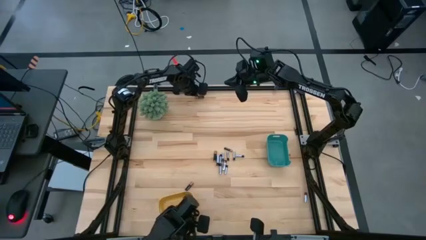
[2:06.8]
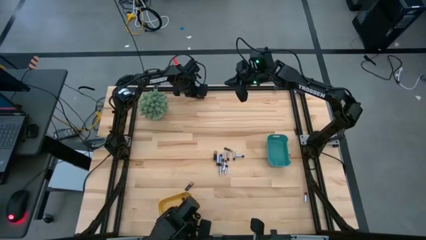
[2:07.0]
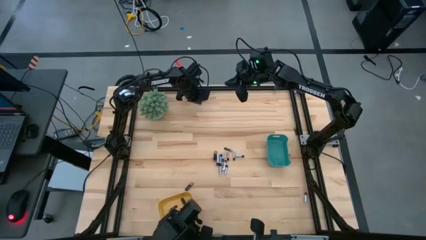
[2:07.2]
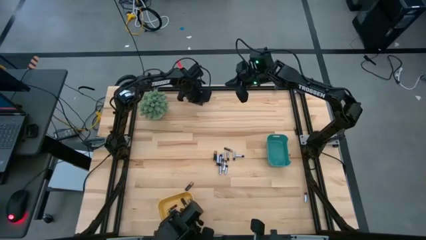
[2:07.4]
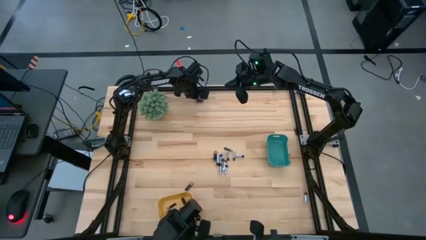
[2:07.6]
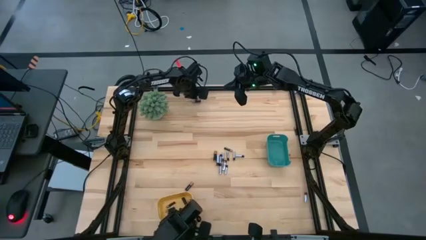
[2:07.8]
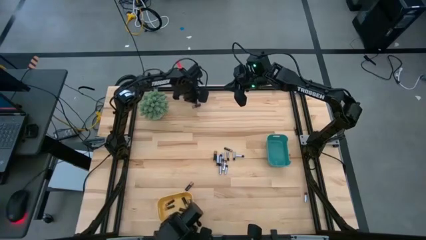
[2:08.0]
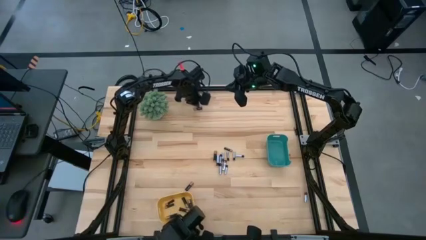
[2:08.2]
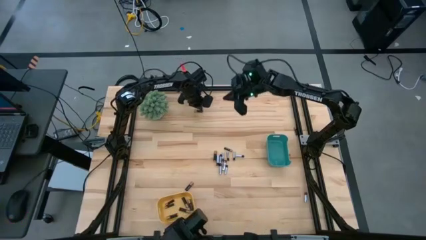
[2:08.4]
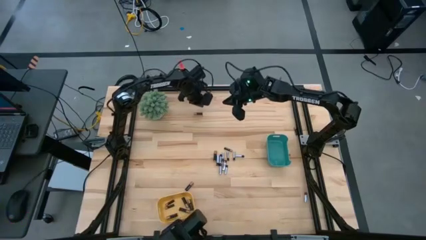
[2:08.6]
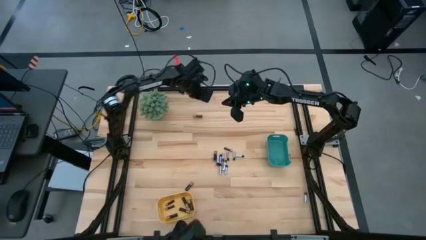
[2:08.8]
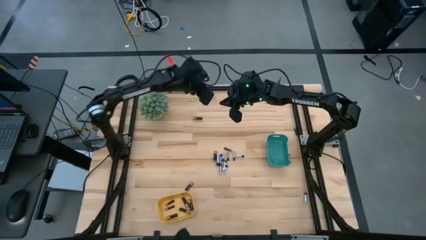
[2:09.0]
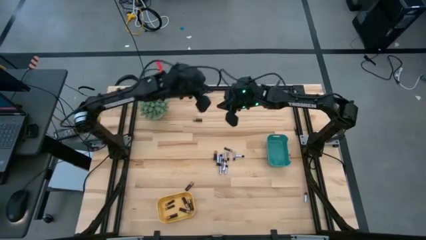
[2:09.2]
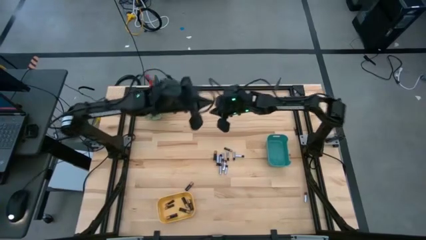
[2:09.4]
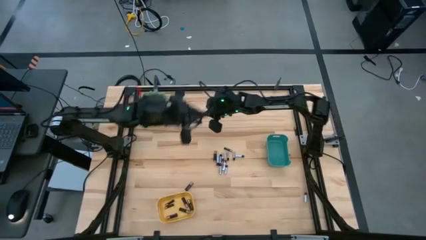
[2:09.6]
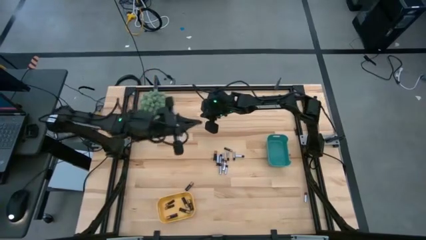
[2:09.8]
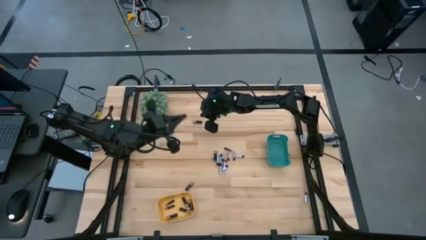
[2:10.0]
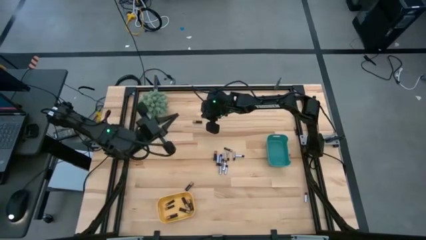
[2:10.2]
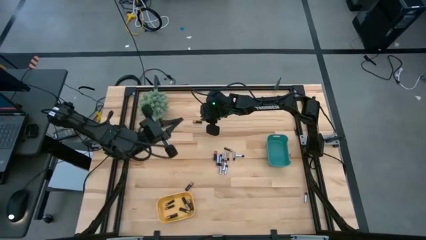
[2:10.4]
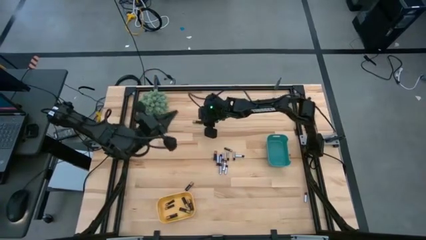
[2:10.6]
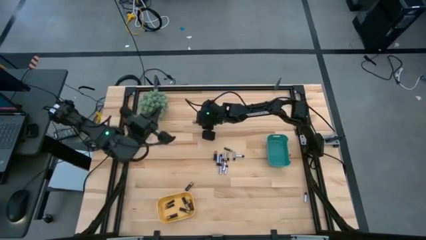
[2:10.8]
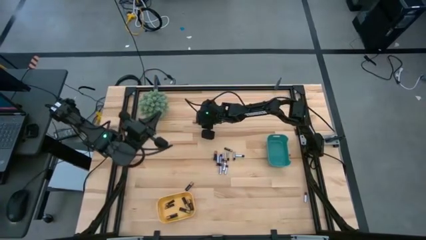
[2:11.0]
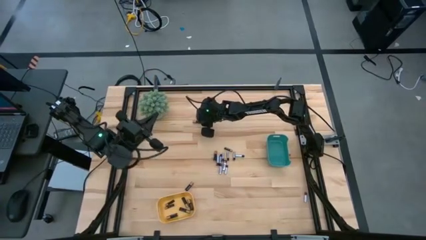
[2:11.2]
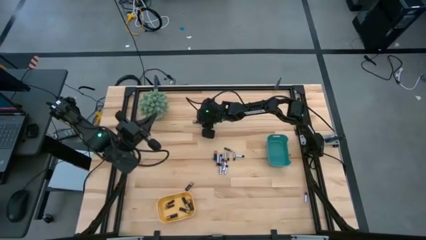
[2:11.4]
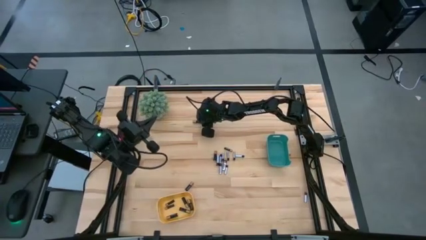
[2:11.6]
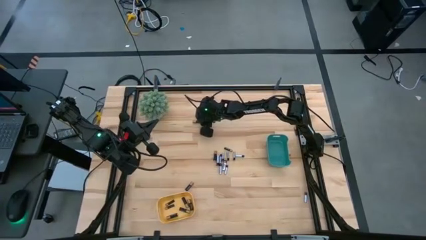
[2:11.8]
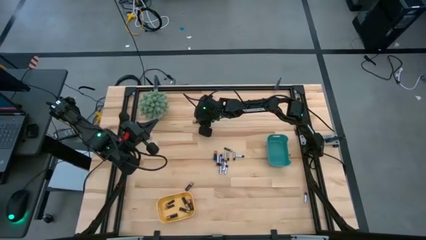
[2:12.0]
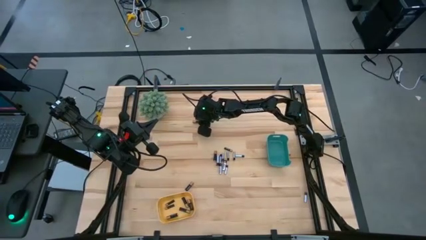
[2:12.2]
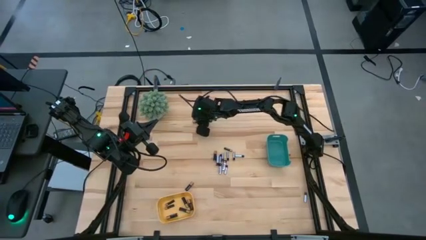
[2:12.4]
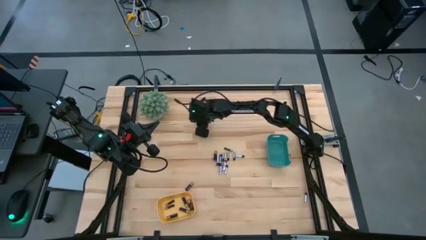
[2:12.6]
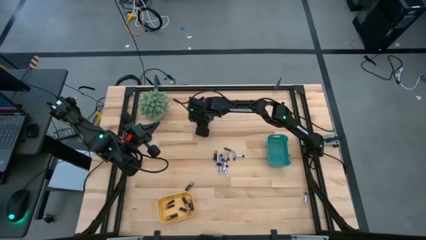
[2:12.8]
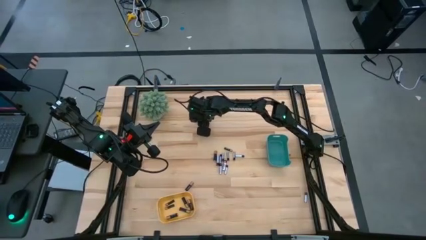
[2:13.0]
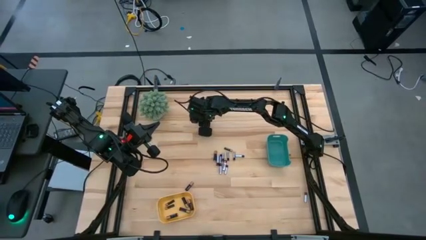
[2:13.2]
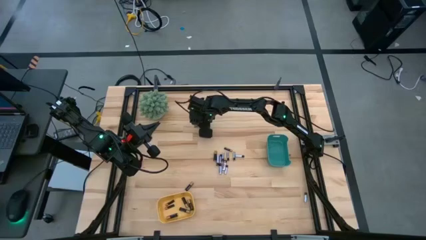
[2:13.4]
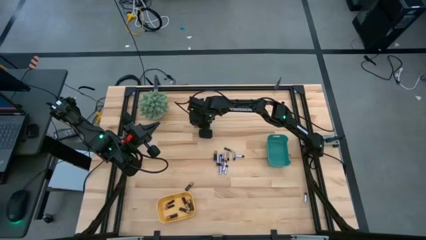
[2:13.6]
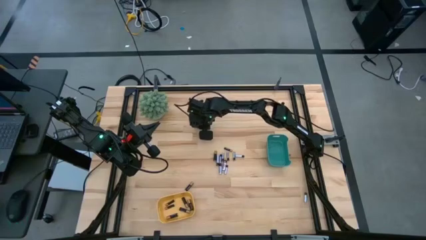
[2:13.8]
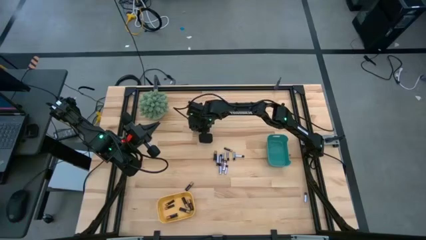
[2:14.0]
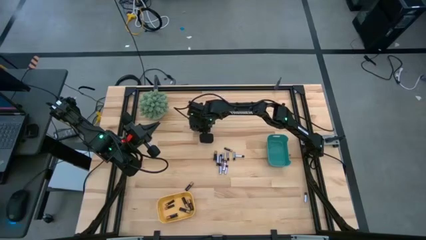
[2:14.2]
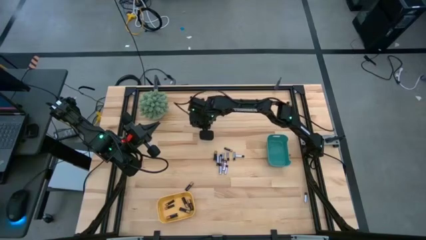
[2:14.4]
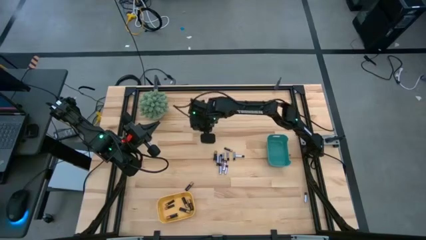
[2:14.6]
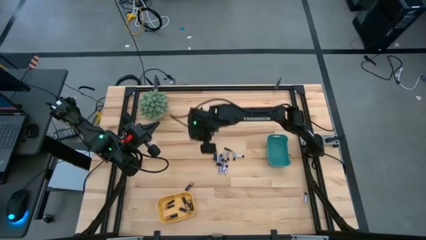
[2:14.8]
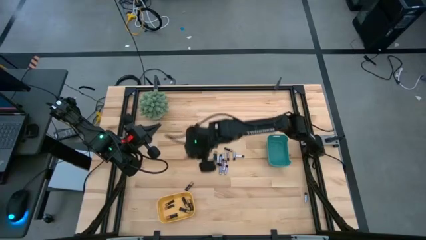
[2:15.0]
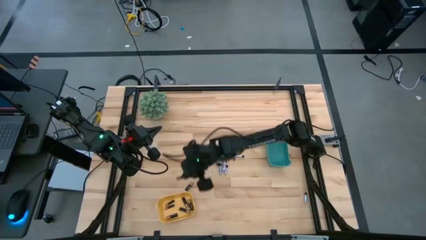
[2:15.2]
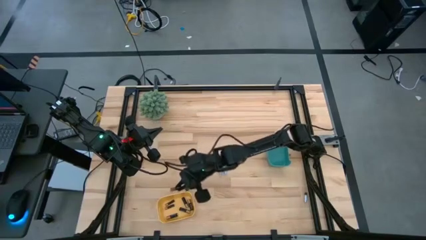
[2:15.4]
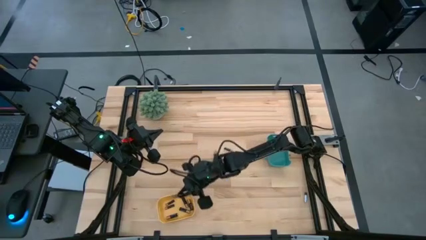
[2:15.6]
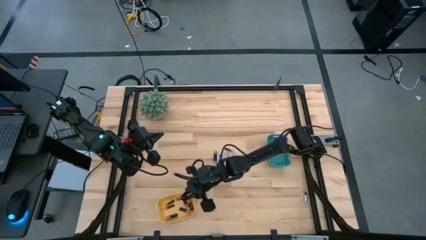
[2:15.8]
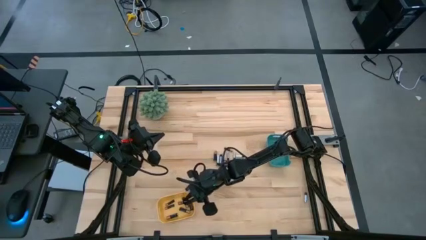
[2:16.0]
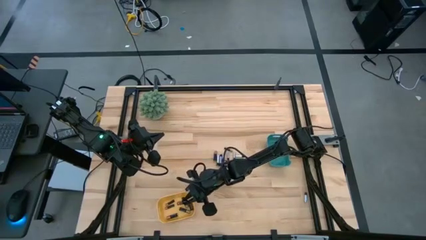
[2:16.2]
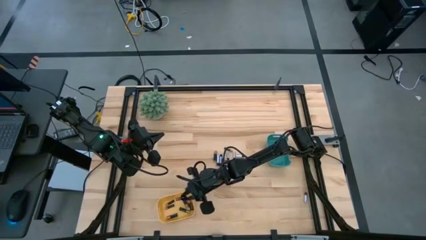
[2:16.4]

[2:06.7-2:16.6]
Task: Sort batteries
Put the black battery into the yellow bin

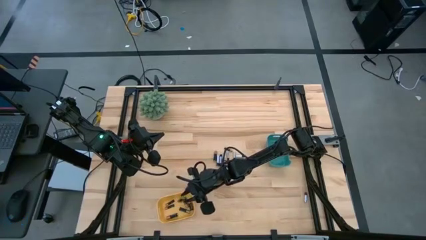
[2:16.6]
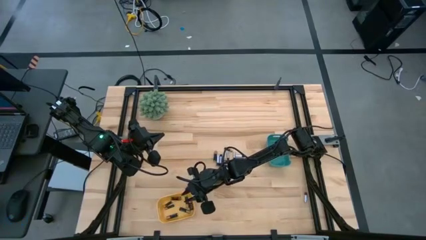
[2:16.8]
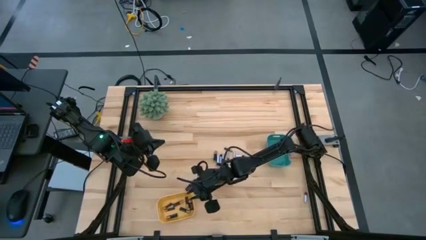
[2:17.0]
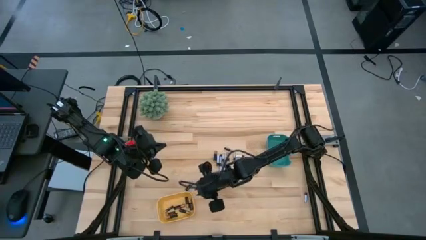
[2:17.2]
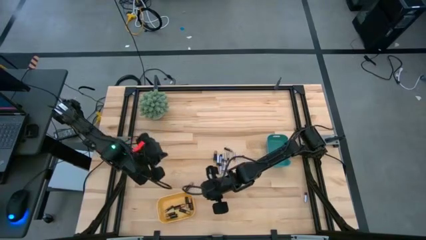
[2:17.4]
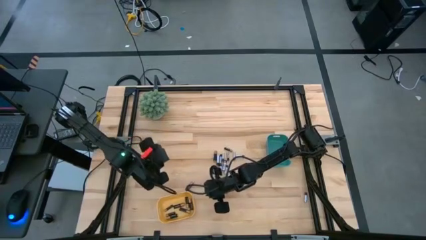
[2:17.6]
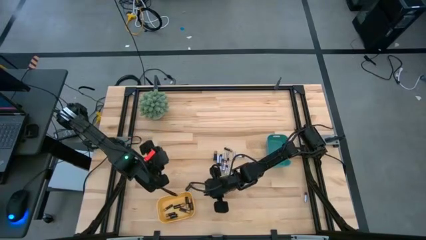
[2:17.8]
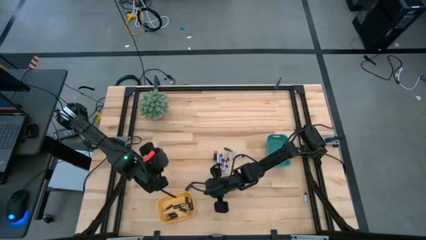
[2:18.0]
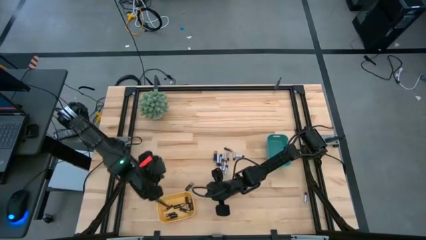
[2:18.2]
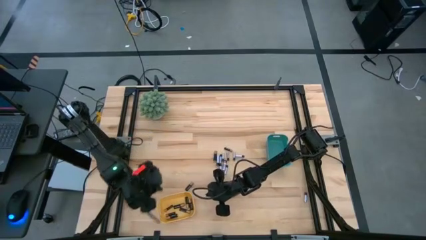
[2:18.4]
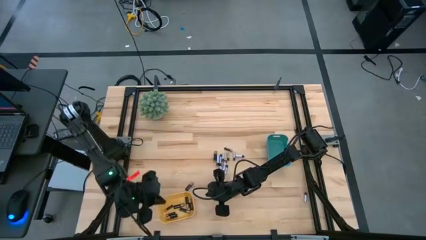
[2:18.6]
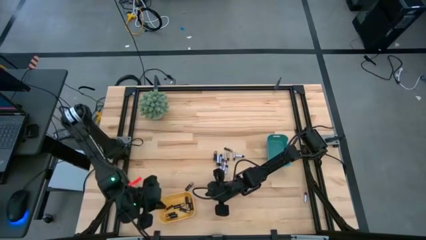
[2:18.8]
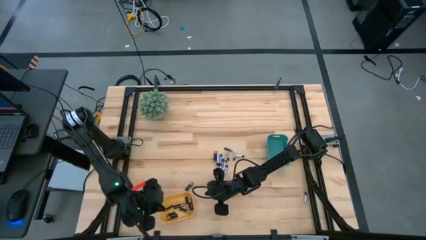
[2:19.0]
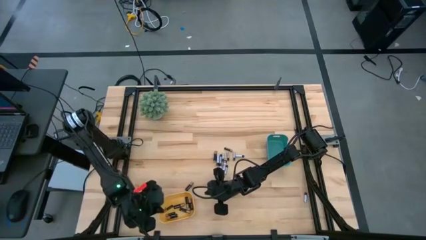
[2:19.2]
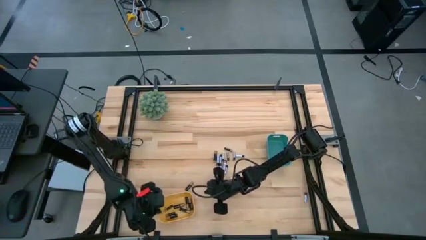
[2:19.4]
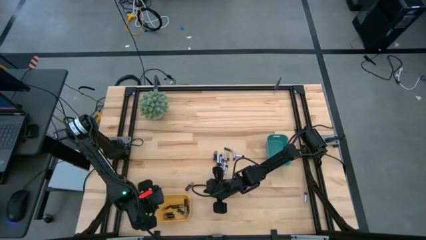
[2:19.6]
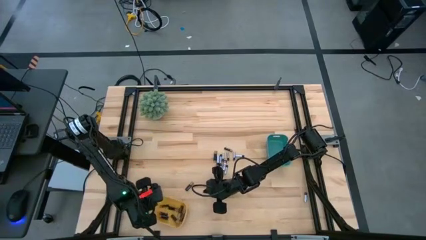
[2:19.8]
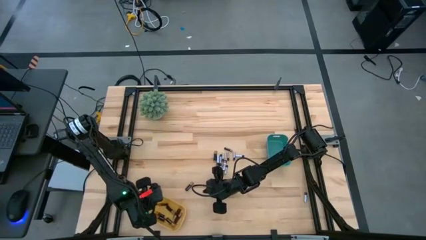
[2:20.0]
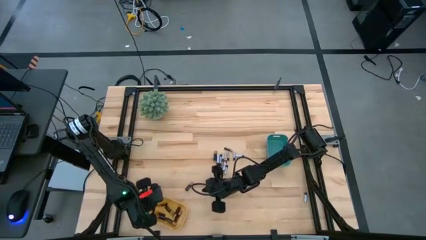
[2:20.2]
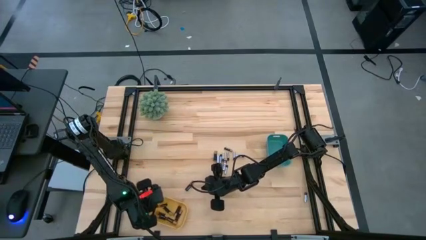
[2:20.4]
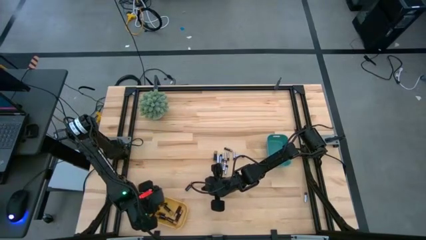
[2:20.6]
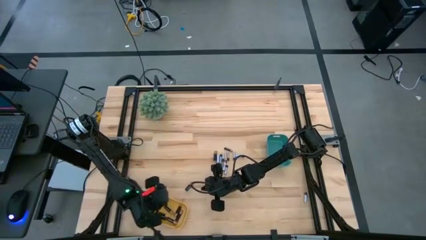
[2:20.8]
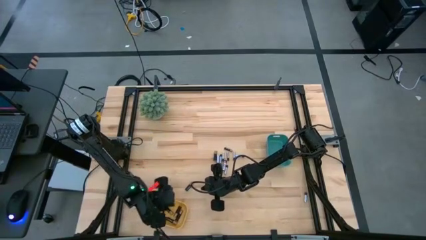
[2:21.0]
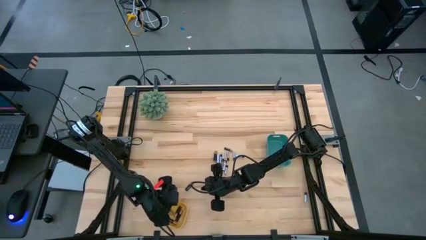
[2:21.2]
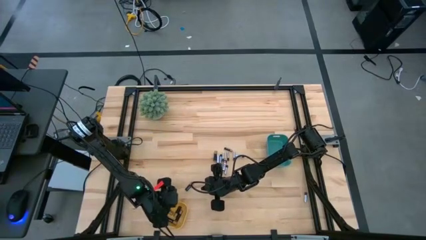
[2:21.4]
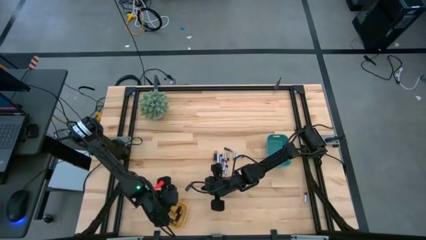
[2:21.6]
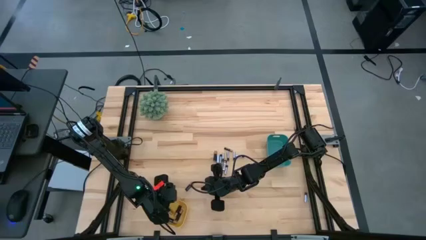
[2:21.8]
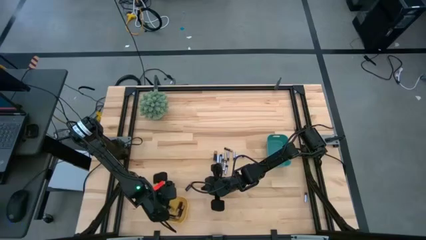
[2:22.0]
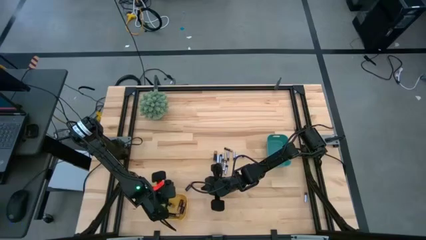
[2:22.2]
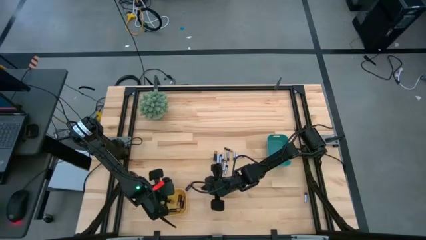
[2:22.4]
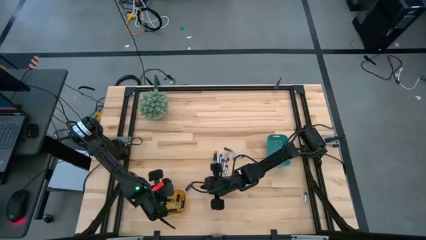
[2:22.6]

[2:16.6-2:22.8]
Adjust the yellow bin
